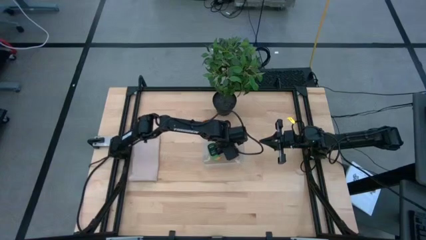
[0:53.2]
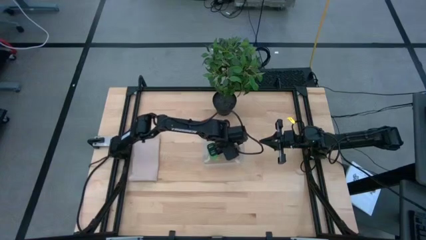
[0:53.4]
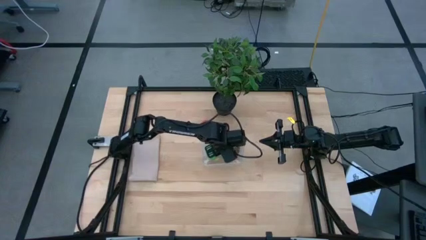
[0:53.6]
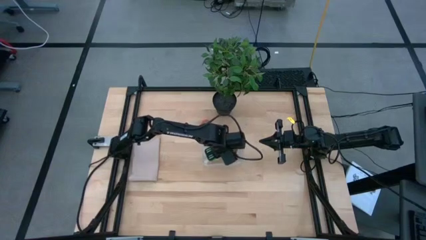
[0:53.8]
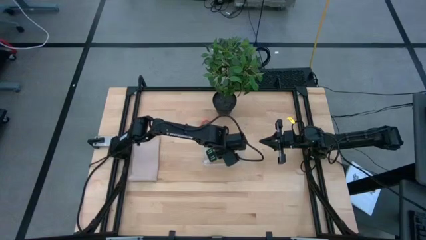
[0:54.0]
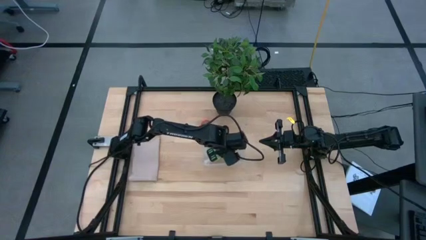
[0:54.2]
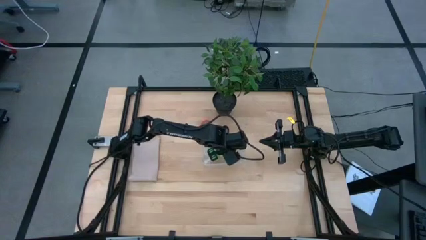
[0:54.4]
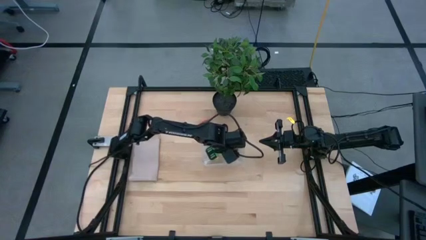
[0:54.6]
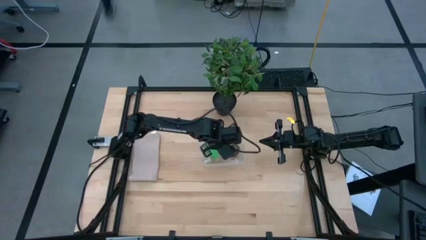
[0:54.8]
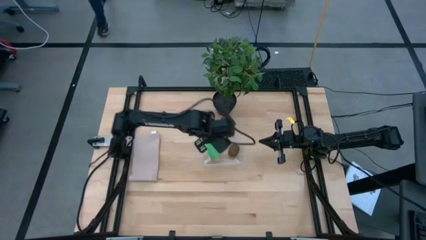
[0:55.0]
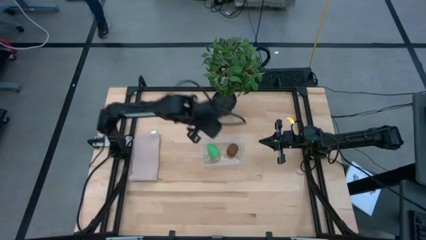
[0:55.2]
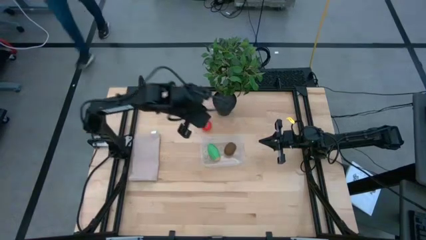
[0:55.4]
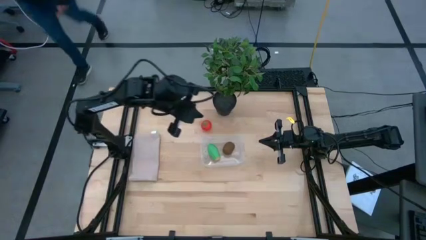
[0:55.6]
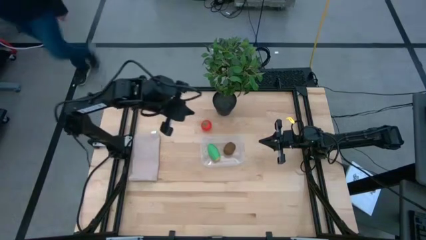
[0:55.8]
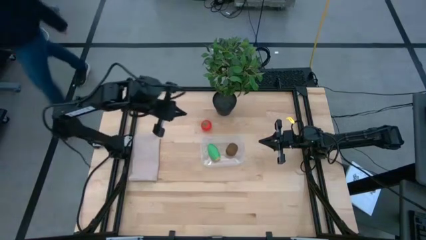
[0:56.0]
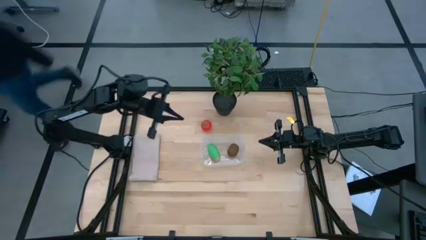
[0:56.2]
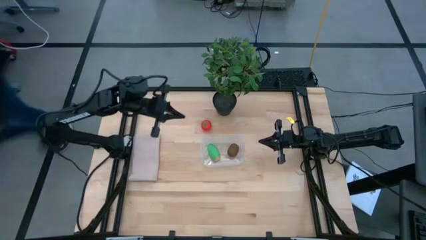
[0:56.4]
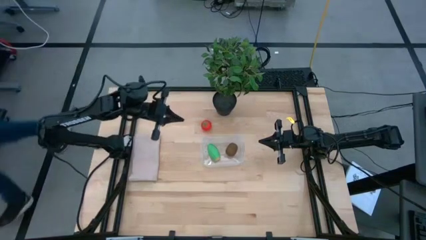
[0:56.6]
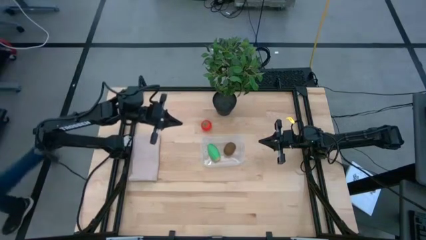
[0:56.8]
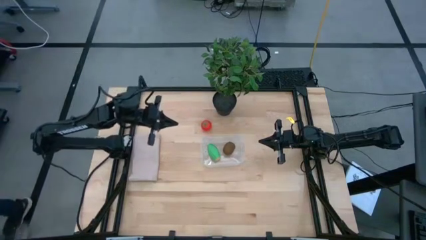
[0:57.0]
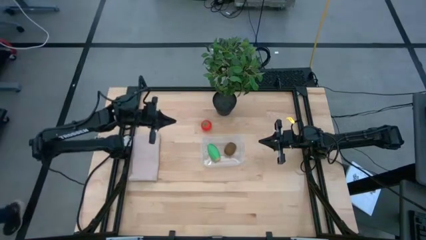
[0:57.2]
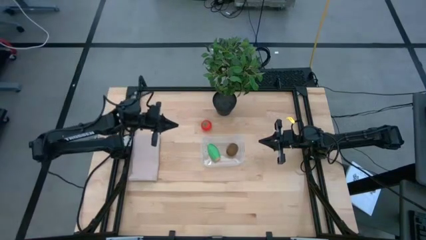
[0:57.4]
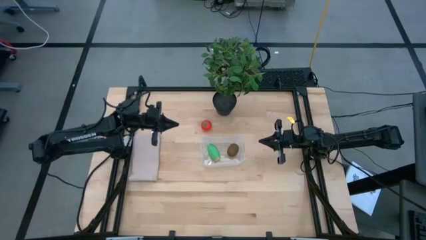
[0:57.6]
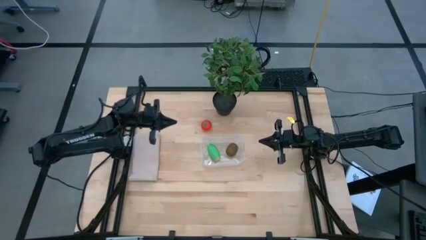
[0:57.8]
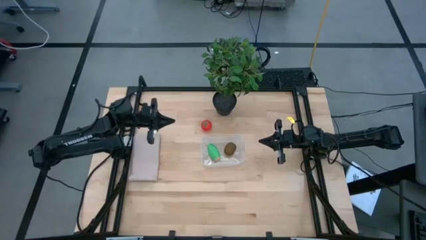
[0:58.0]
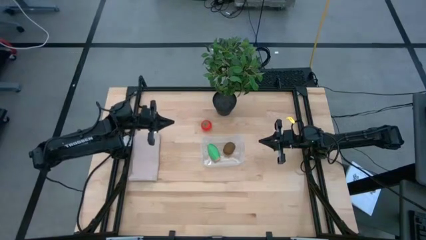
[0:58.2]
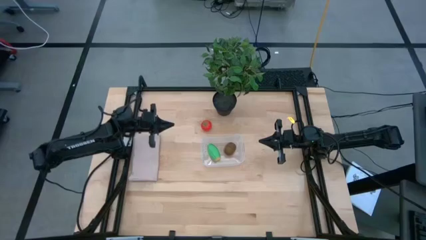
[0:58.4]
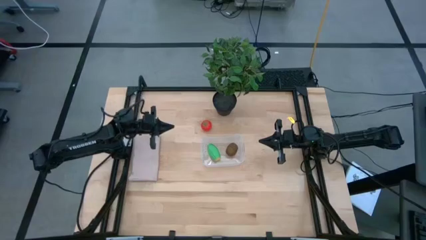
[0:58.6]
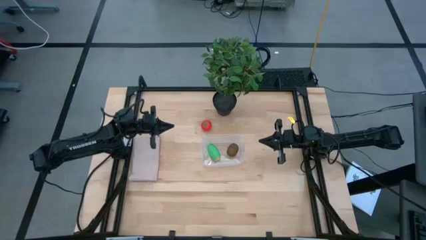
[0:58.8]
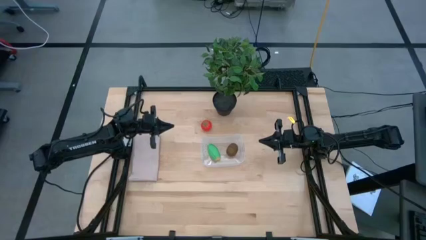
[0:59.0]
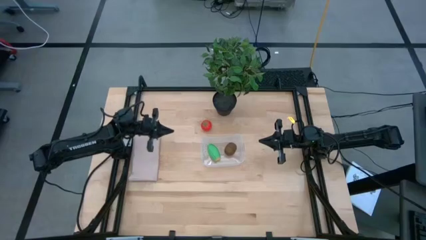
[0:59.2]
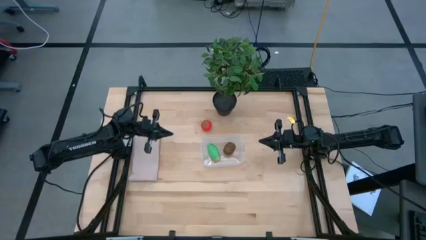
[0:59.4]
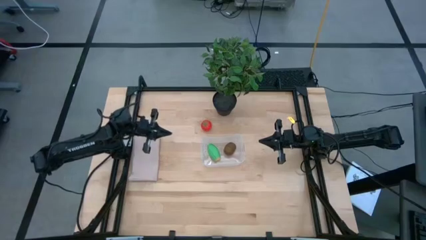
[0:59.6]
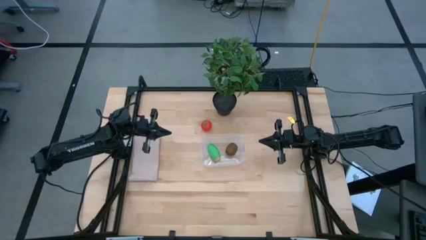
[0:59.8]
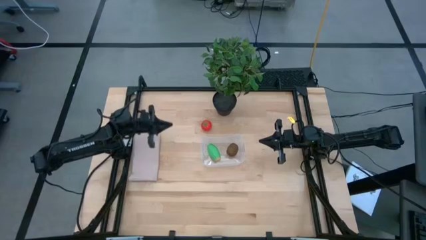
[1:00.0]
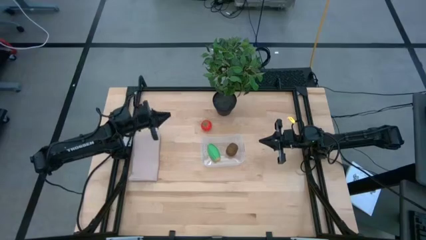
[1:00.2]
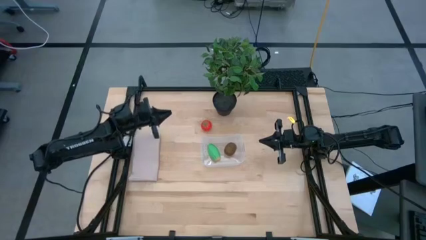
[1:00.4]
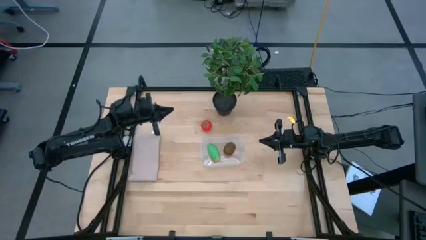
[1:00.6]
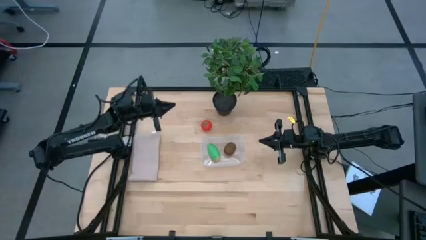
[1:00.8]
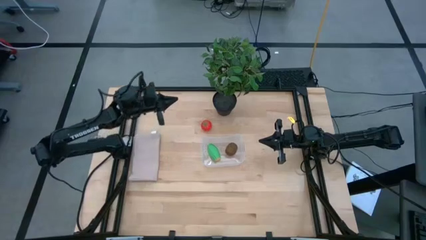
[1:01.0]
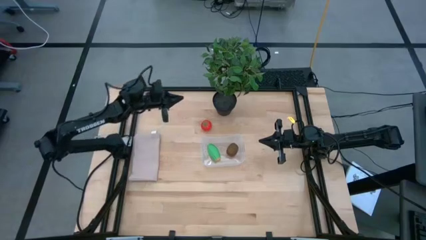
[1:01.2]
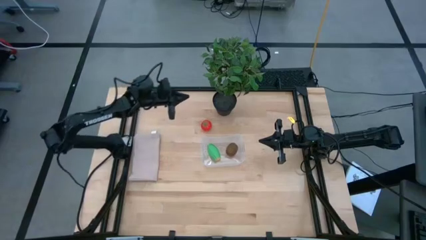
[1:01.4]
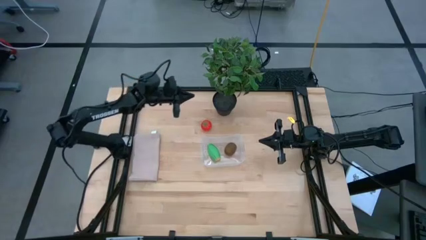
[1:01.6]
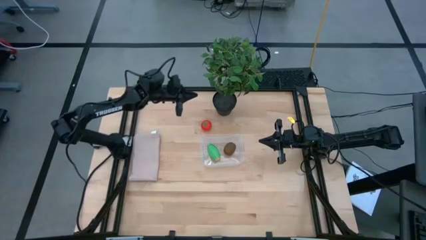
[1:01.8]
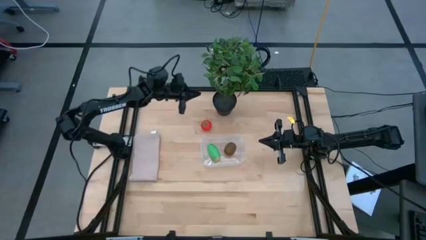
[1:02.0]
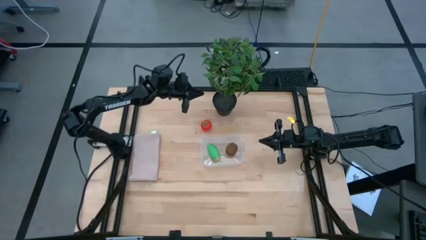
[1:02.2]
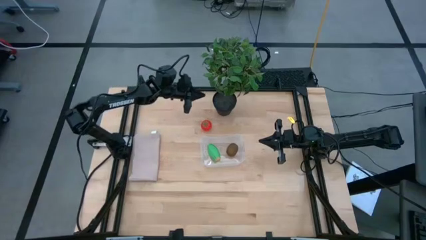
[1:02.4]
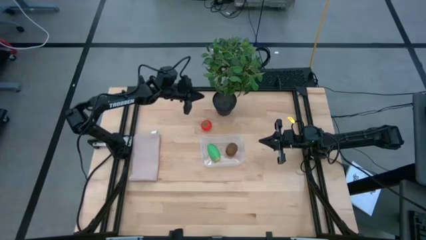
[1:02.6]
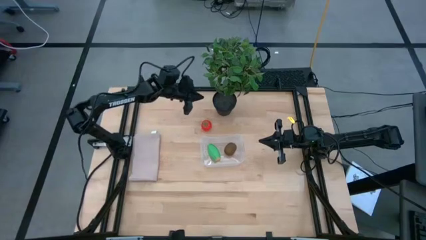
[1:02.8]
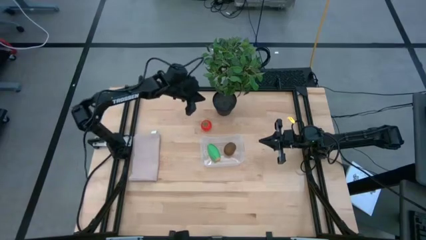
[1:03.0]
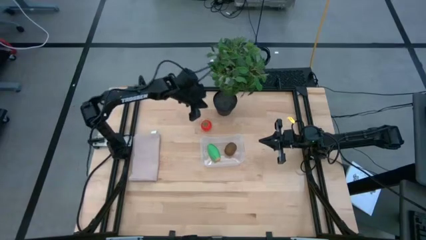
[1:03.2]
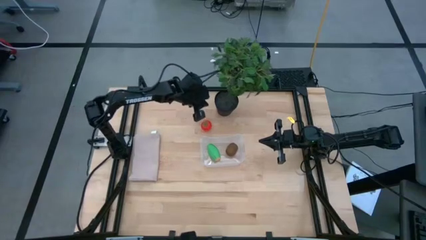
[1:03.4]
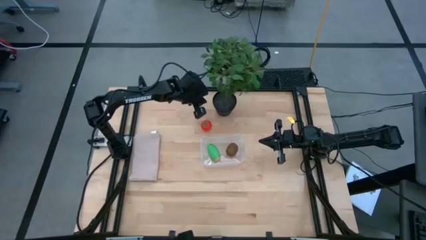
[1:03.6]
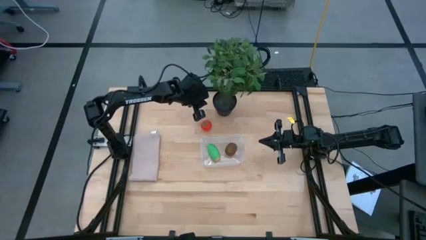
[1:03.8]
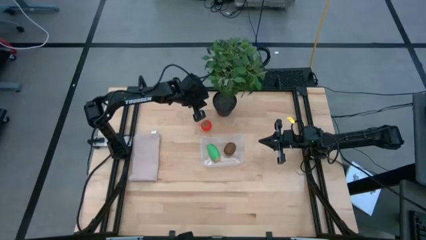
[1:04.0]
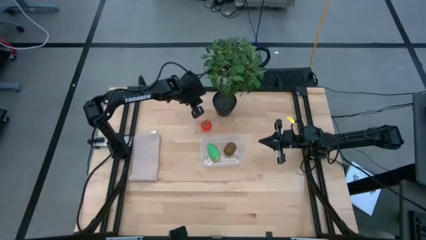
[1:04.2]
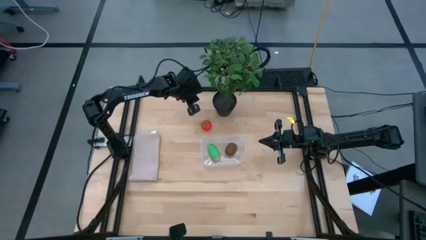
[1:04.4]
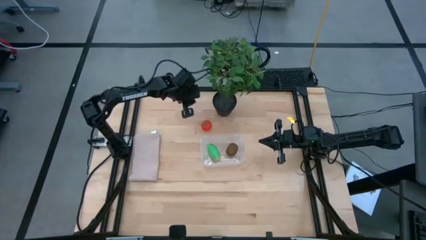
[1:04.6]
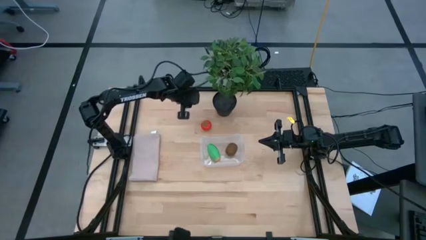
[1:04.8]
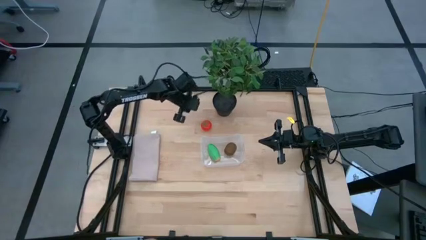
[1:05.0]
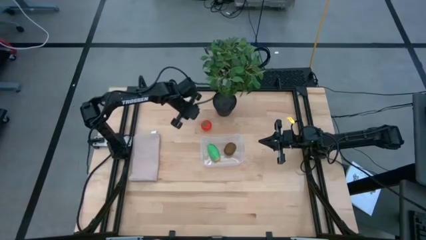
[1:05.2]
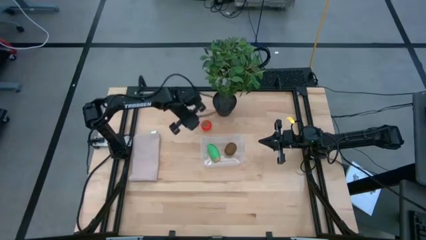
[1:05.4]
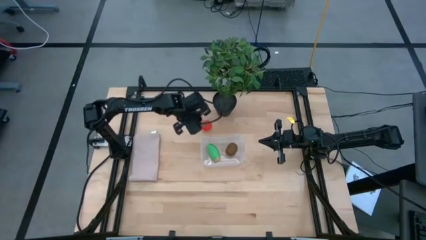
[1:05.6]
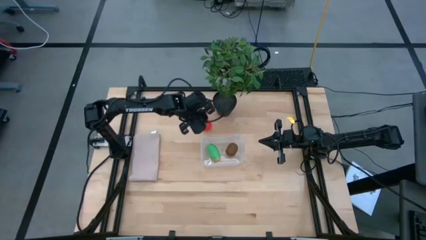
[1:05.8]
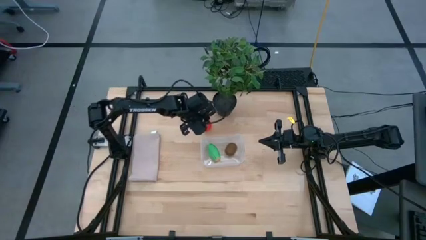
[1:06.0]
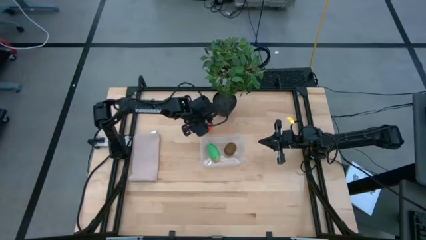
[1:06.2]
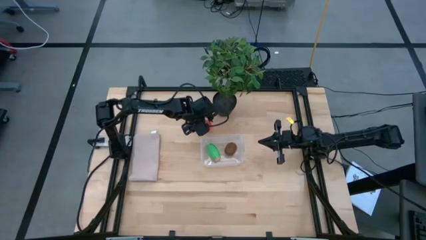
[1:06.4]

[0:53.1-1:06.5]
Task: Pick and placing Produce into tupperware
Put the red tomato into the transparent bin

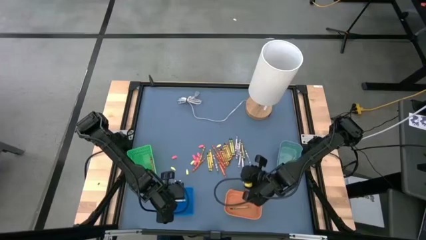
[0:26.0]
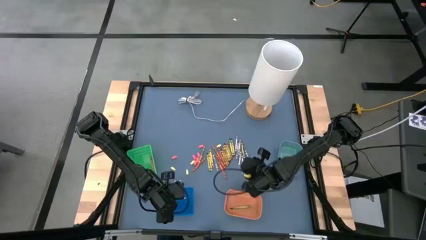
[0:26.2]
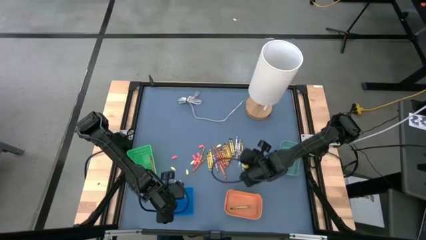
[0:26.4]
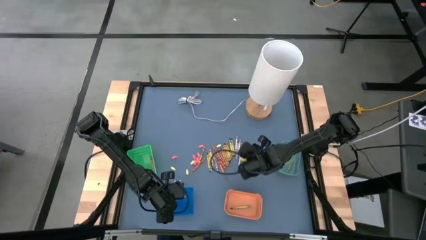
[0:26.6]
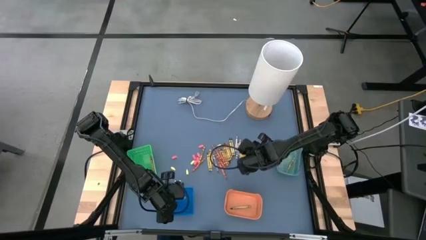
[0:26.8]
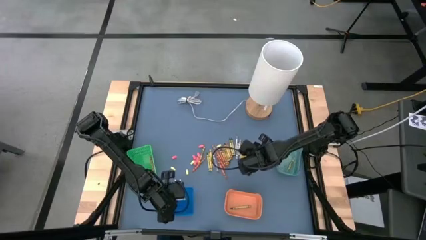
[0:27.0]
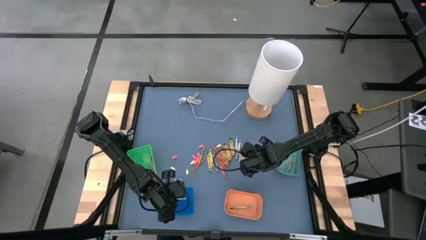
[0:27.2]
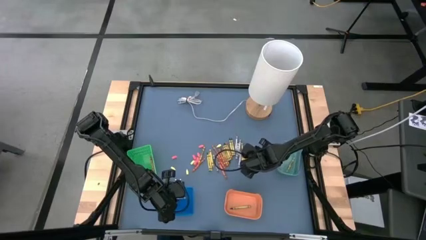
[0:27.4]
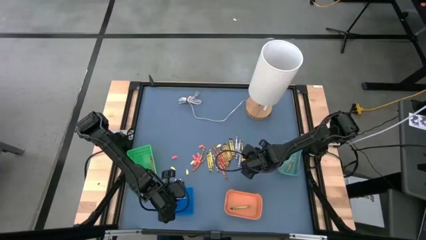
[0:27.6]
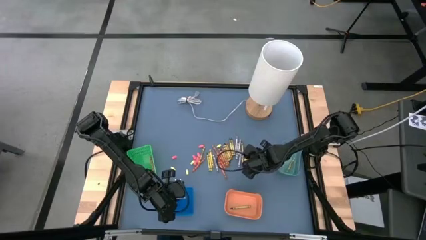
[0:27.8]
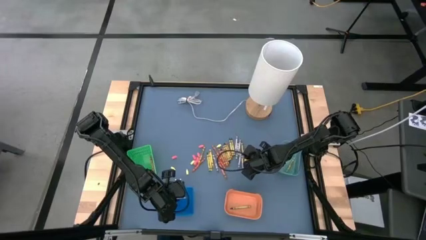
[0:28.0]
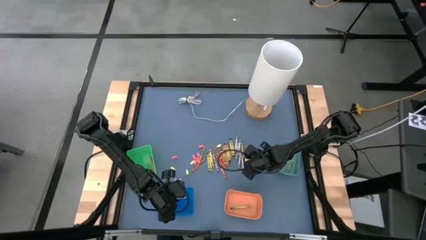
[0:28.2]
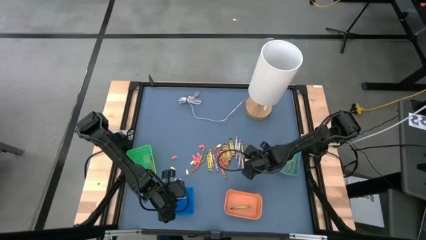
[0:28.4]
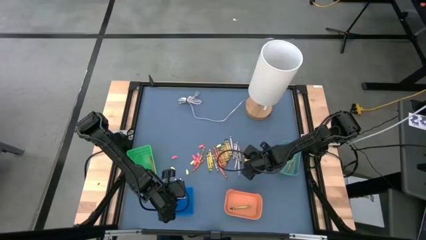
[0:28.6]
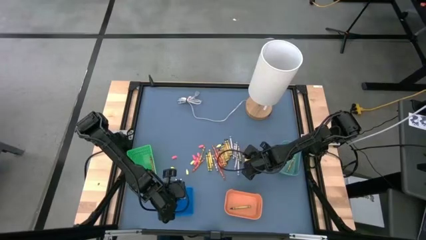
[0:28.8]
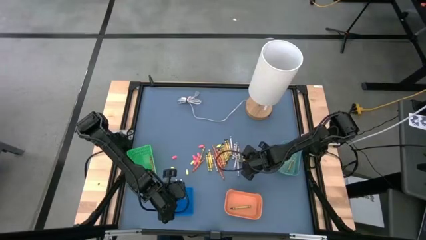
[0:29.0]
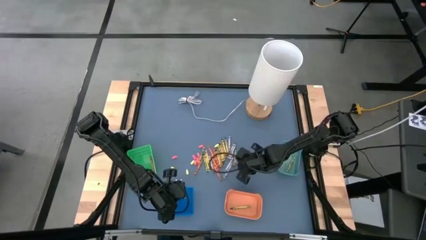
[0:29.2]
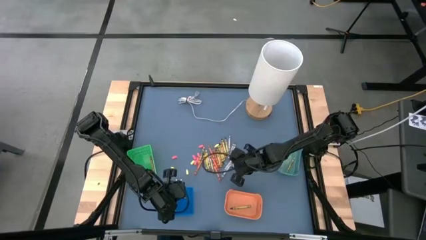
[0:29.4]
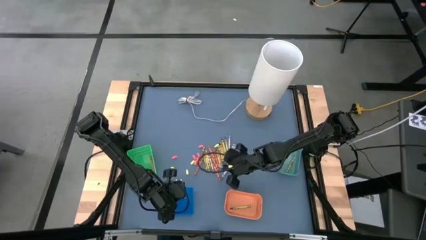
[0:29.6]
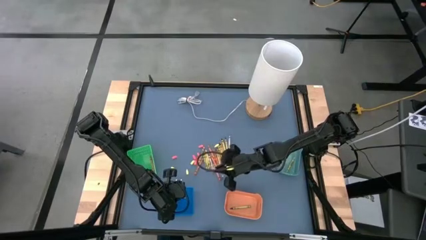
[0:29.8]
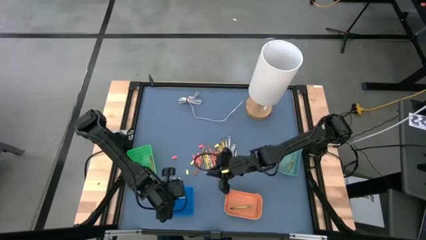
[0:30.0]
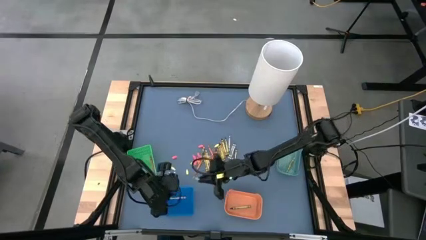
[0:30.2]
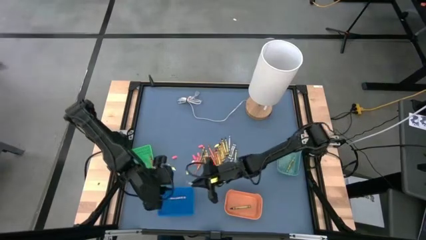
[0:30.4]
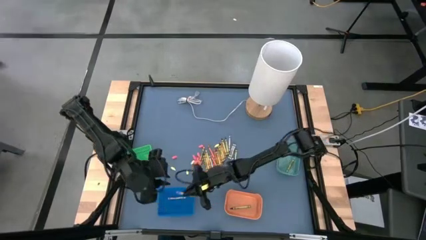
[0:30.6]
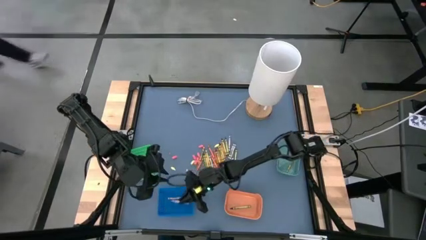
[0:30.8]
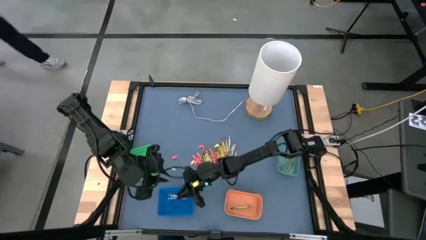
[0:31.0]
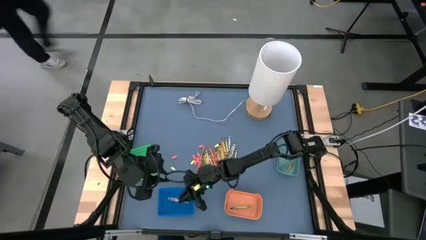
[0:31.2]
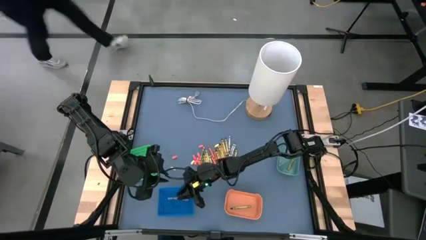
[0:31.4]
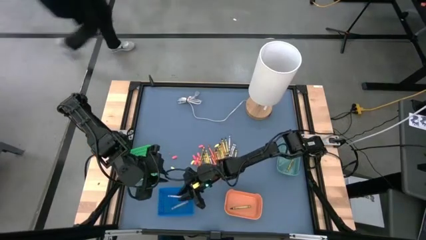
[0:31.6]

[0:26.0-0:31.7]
Task: Sort crayons
Put the gray crayon into the blue bin
